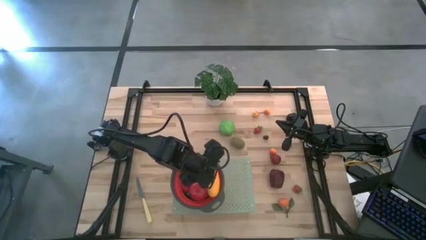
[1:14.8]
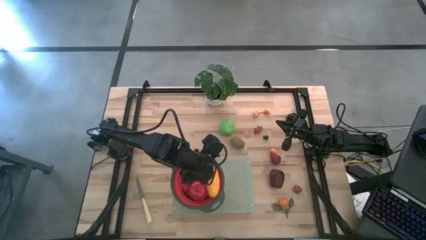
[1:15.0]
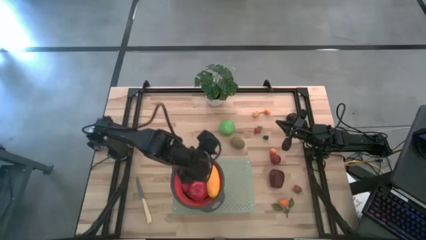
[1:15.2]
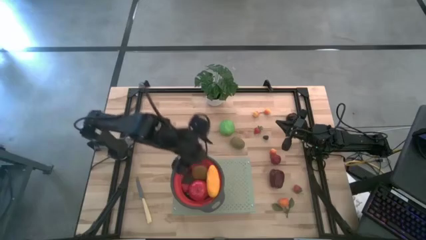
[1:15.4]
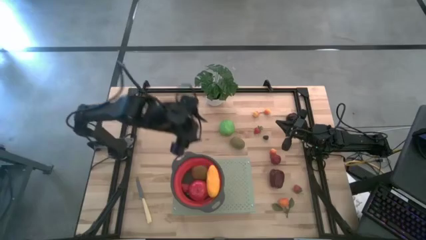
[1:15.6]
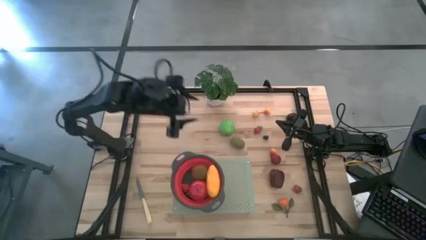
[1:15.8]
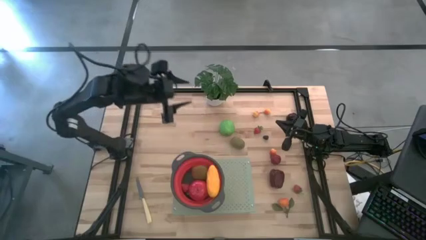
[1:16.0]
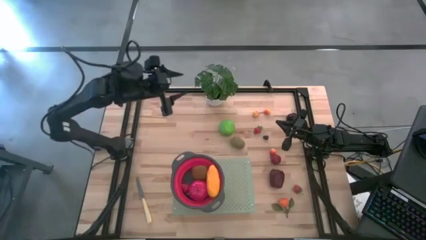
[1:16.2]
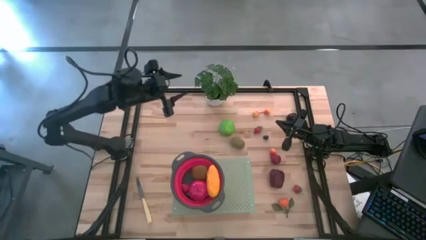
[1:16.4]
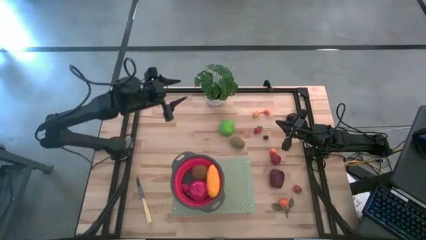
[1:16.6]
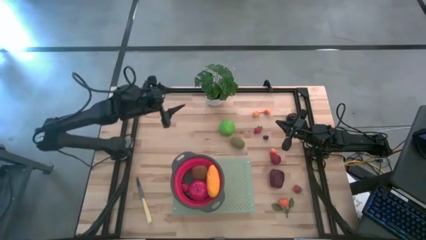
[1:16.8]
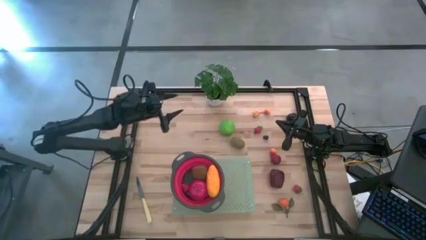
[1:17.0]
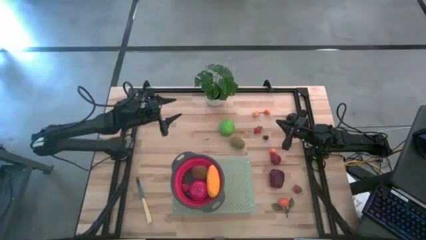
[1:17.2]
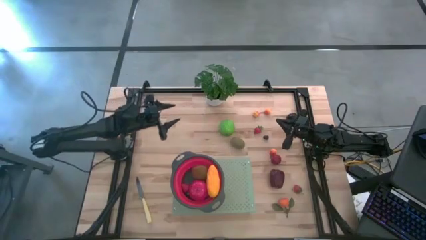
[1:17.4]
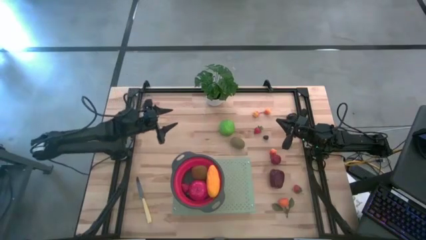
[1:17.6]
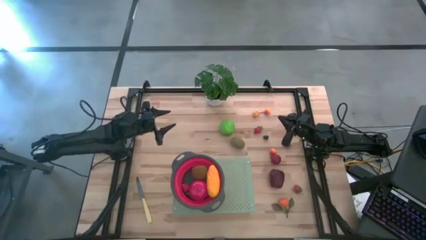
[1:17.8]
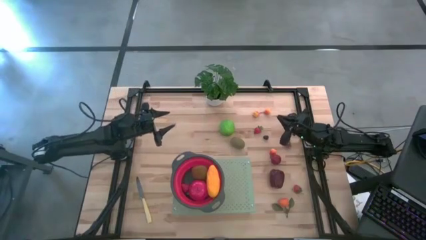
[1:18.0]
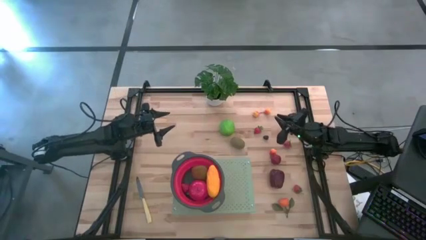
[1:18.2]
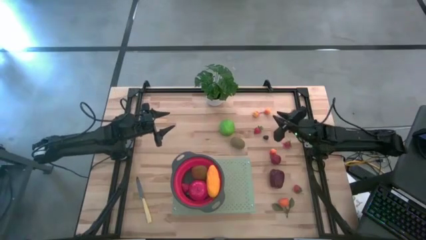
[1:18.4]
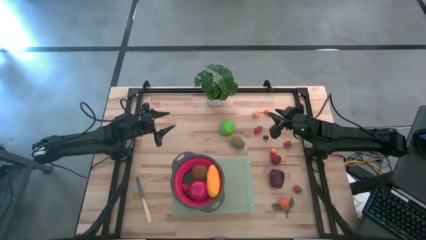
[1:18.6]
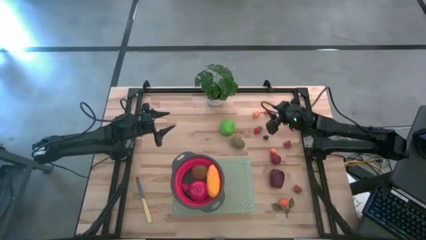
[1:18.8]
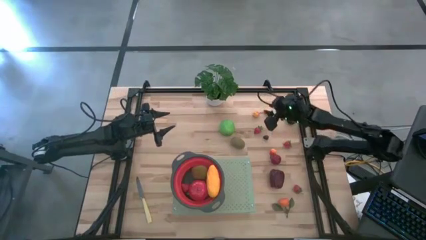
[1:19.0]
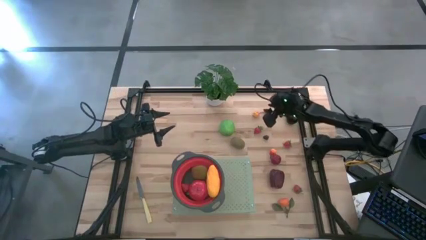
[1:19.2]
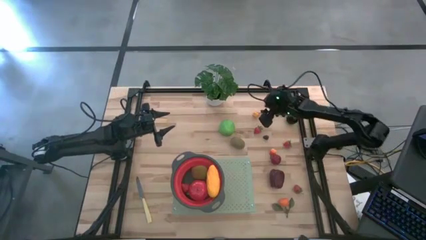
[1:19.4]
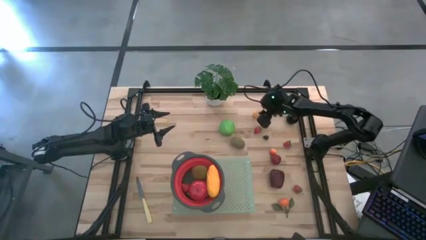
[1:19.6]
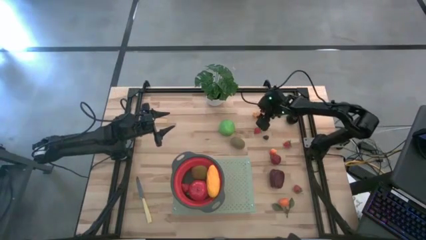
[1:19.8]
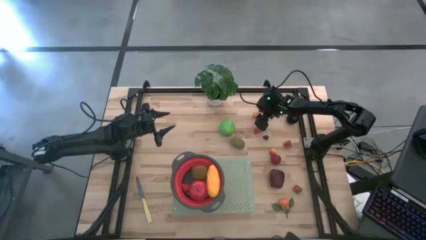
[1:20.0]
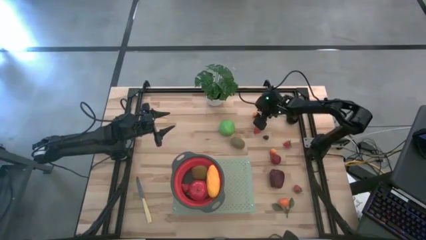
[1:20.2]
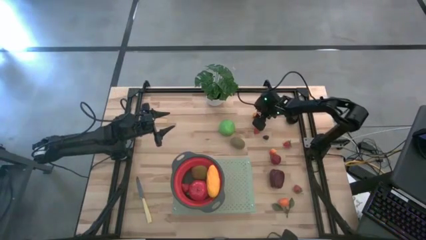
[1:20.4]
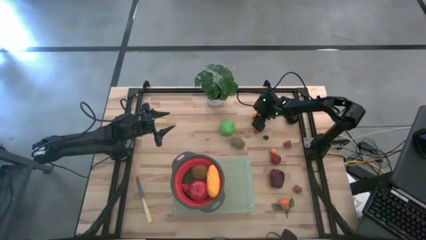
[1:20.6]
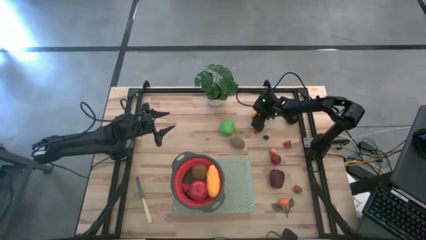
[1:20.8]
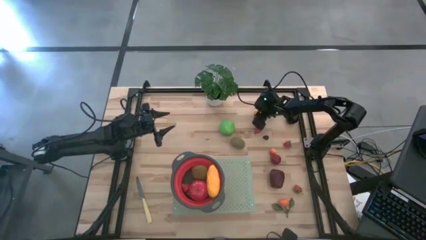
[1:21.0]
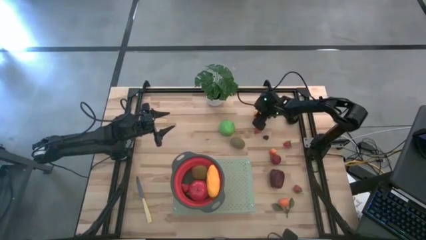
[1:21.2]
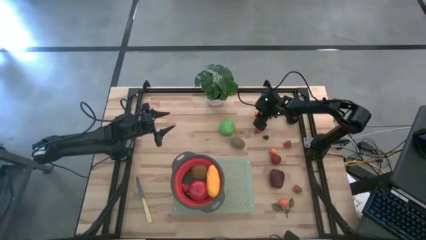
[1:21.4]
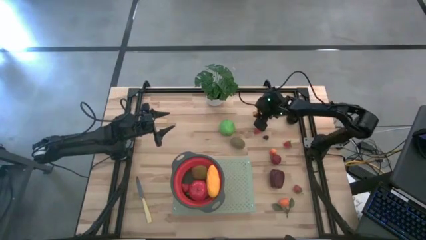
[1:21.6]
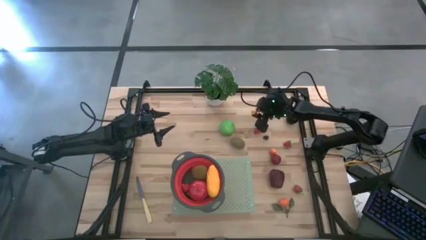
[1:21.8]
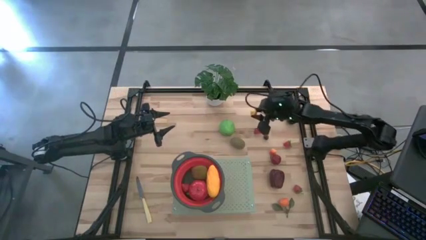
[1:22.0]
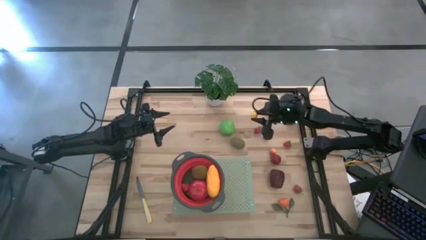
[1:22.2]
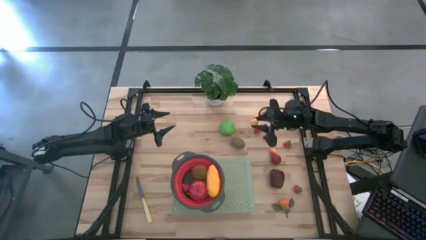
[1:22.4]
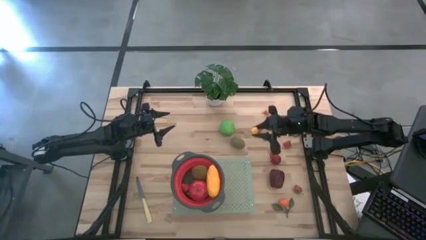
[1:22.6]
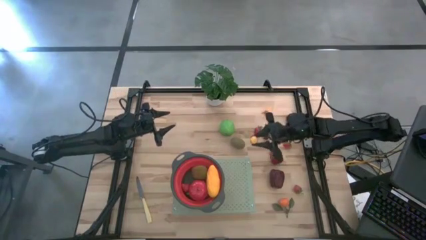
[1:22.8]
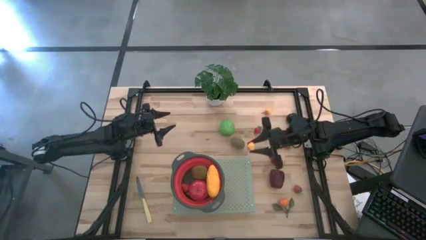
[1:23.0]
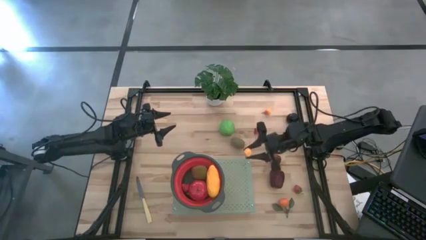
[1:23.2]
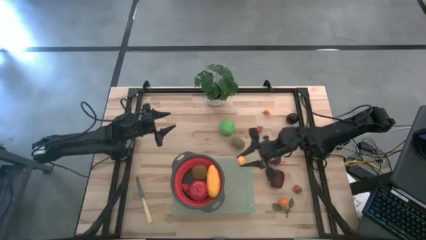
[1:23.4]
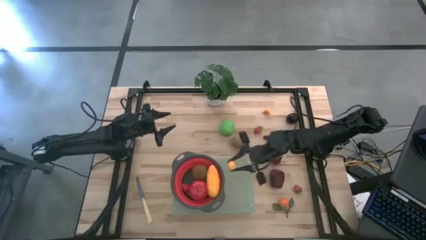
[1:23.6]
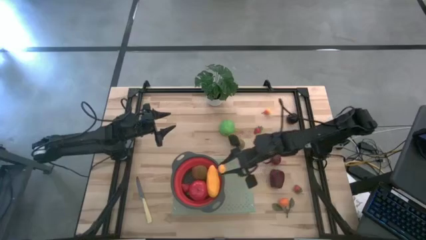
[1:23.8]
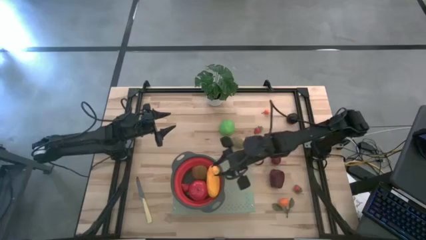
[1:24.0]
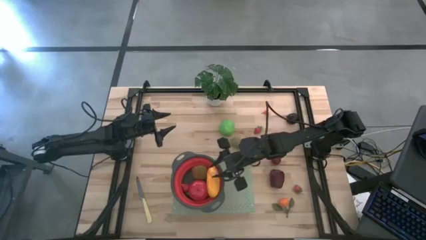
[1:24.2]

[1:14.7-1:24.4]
Task: Pick & Place Fruit
Put the pear into the red strainer

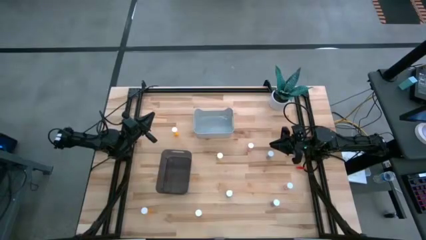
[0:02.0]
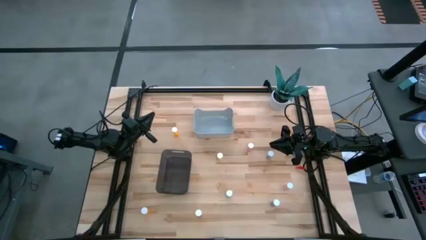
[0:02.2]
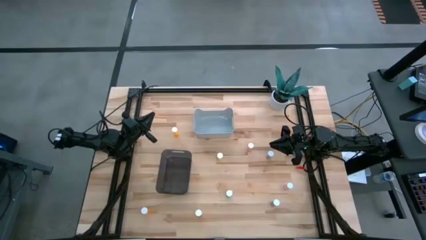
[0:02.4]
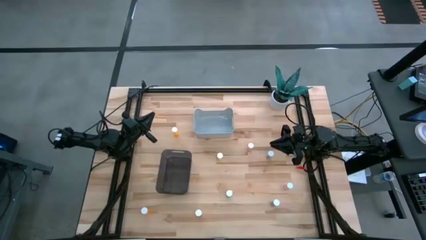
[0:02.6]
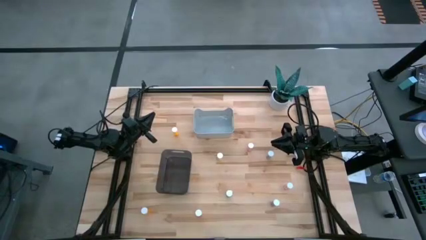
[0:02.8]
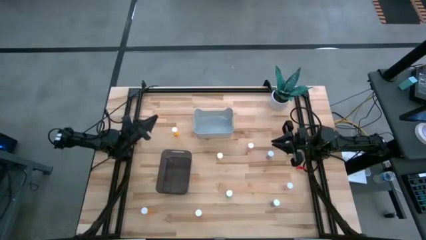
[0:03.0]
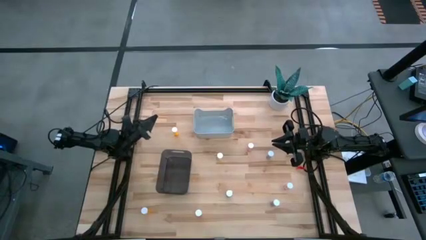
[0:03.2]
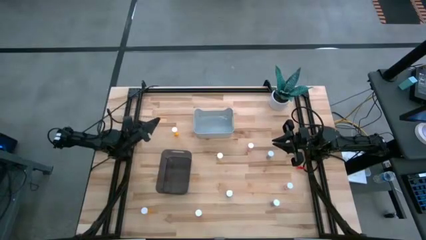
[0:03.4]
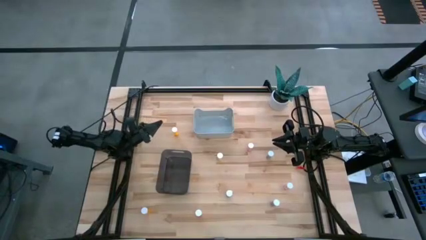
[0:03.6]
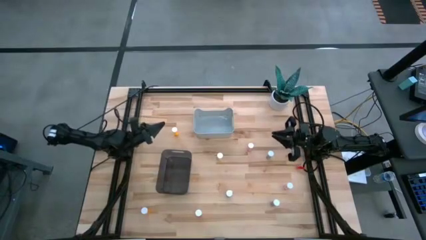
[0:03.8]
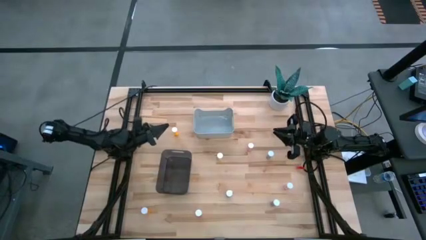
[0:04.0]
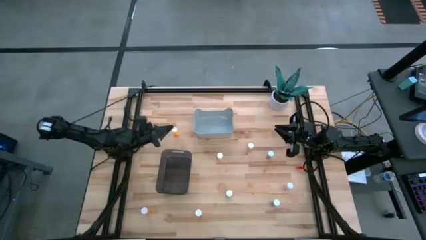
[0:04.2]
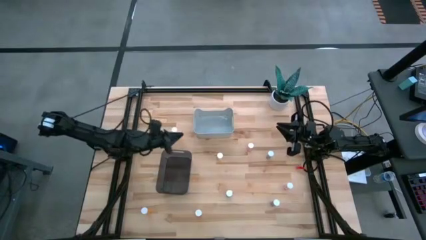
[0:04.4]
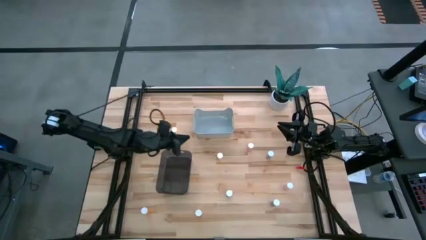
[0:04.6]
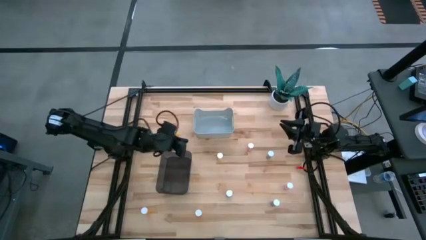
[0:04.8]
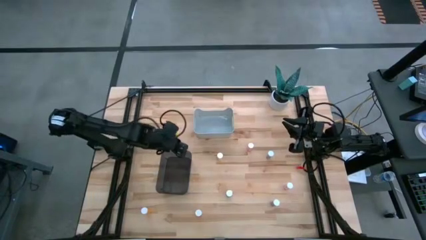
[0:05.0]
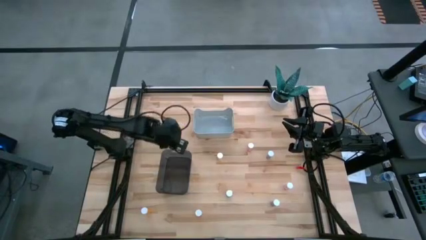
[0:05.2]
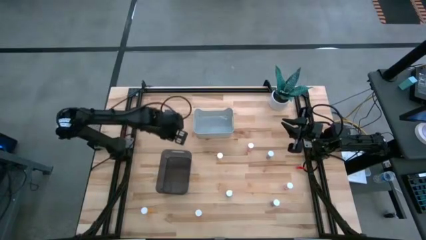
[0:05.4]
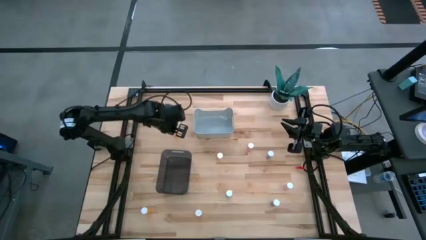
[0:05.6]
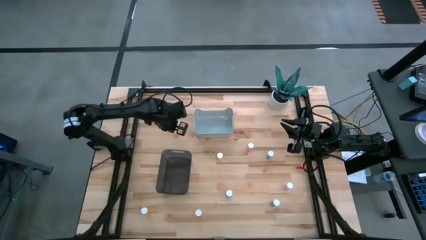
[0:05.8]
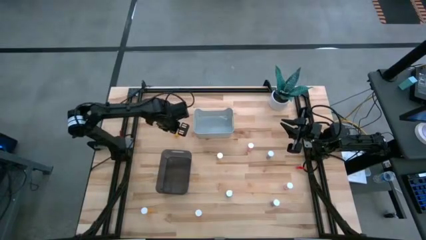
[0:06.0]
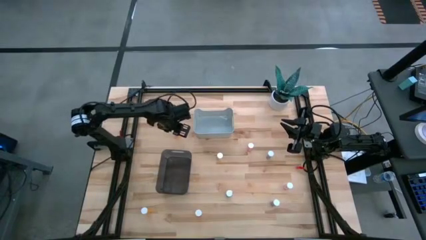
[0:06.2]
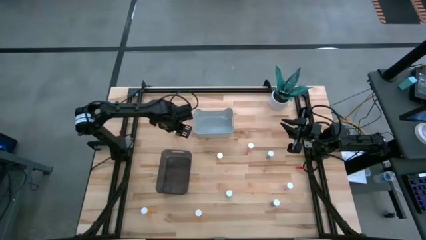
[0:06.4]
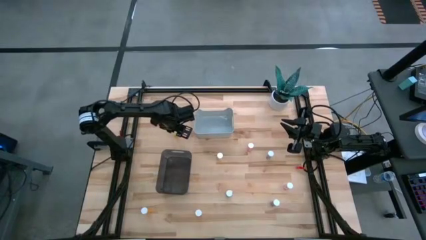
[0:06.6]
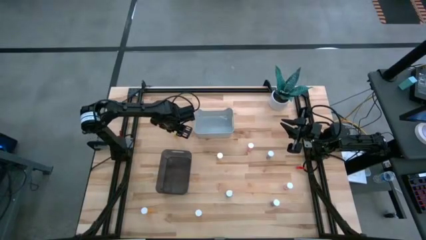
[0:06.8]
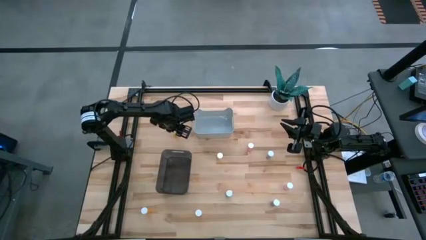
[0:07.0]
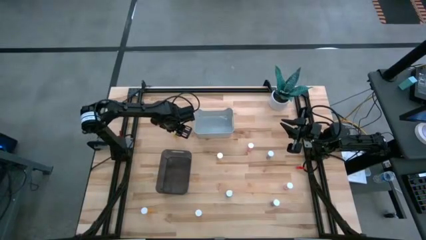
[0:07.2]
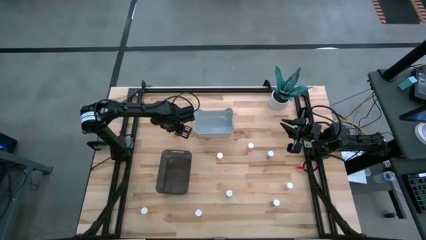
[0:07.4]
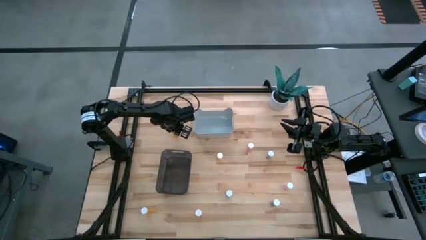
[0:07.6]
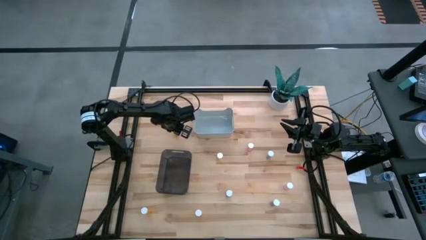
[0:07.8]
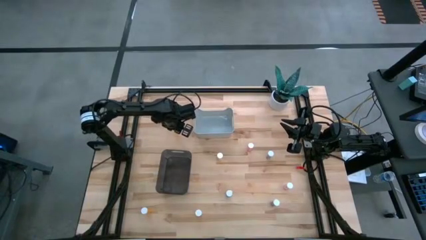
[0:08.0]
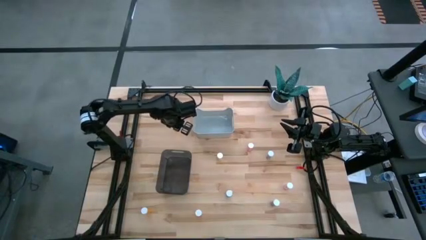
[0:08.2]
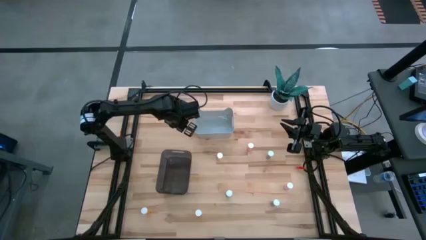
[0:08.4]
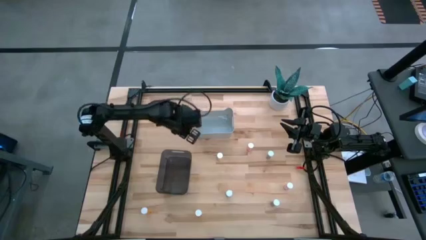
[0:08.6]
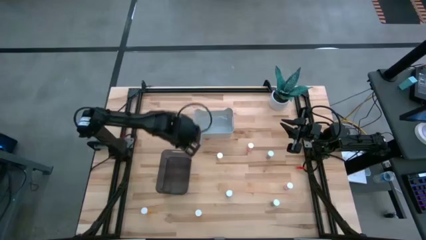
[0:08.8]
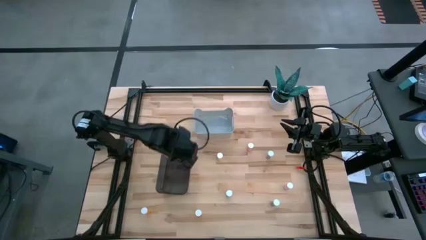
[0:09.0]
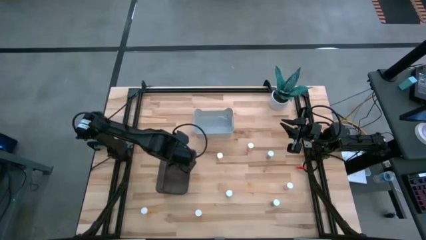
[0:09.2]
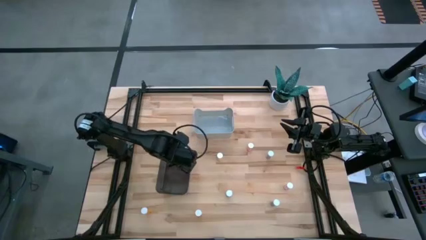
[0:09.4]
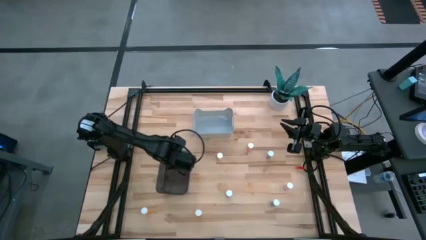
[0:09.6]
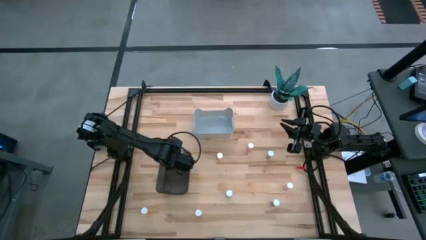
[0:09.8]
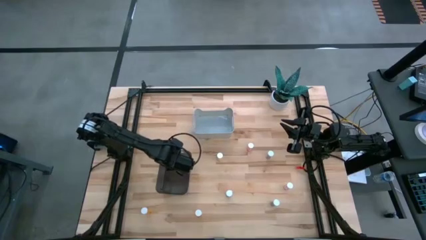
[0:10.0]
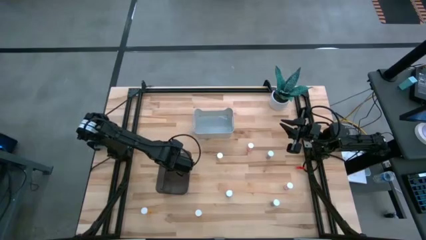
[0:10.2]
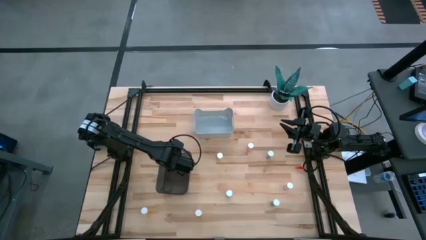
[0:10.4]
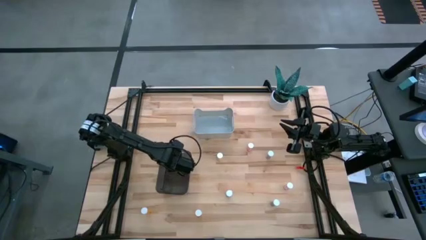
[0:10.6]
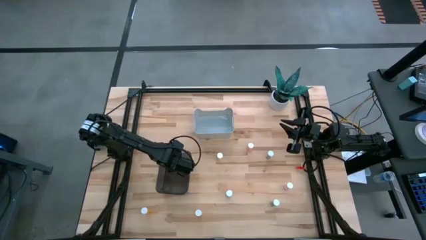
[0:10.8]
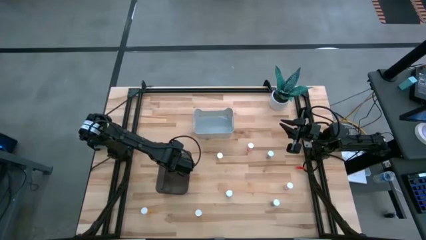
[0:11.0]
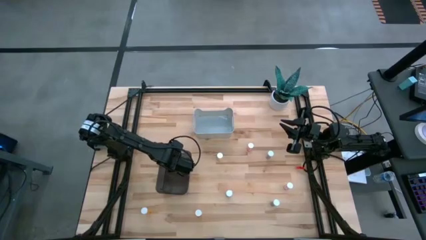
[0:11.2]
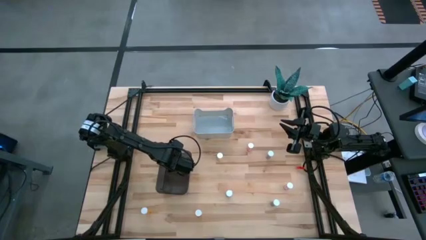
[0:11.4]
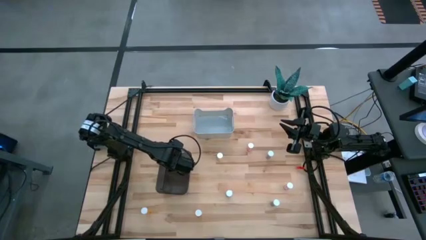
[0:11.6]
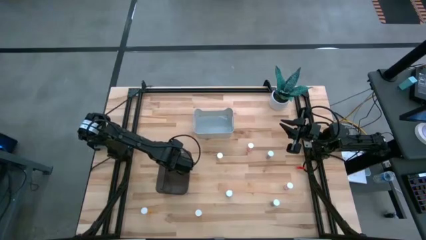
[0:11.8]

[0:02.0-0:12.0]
Task: Pick and place medicine bottles into bin by pill shape (circle, oval)
Put the top orange tablet bottle into the black bin
